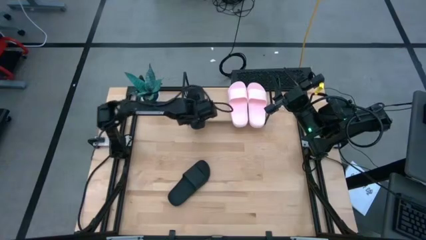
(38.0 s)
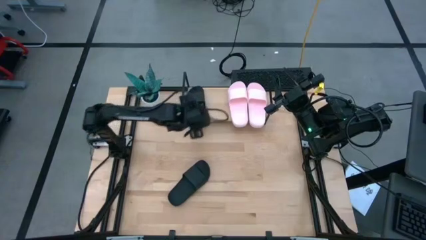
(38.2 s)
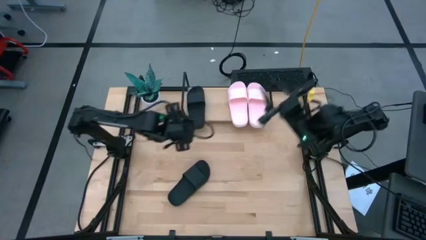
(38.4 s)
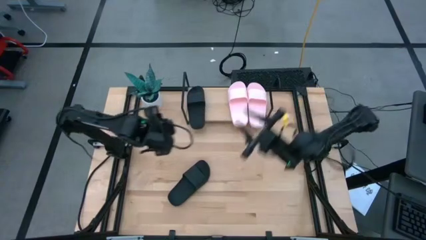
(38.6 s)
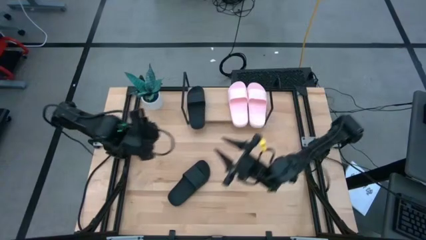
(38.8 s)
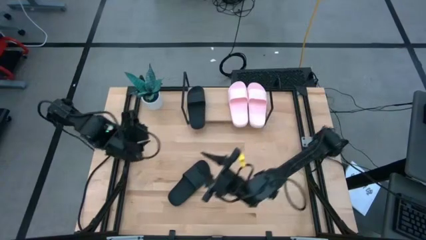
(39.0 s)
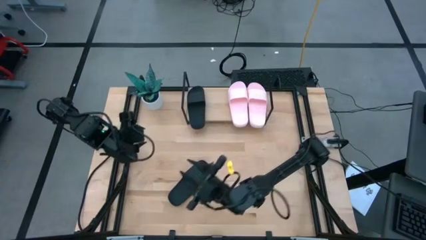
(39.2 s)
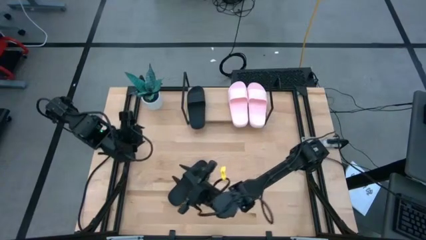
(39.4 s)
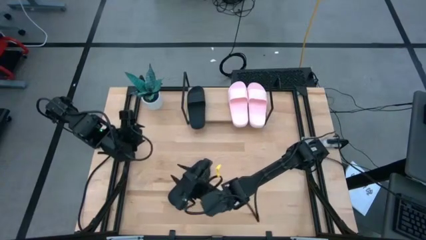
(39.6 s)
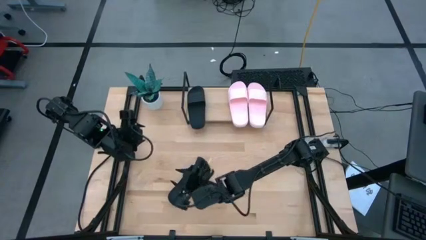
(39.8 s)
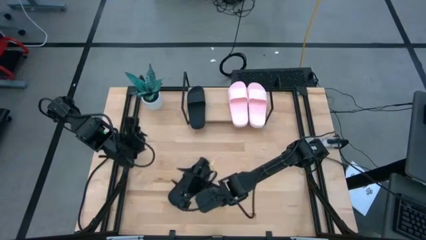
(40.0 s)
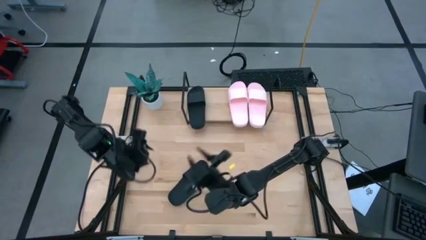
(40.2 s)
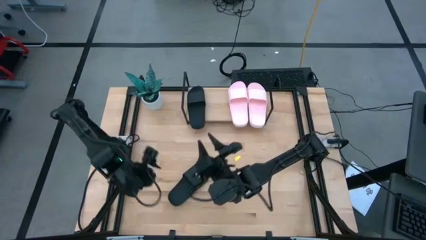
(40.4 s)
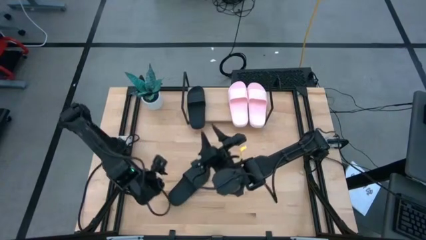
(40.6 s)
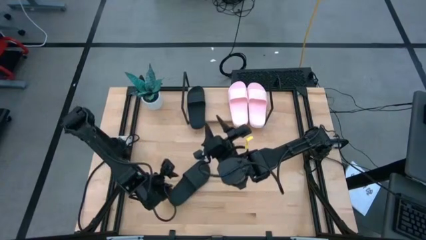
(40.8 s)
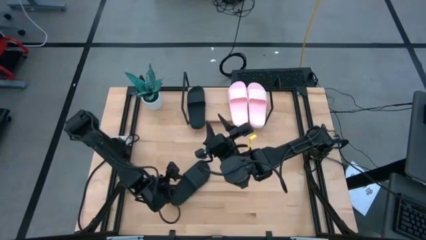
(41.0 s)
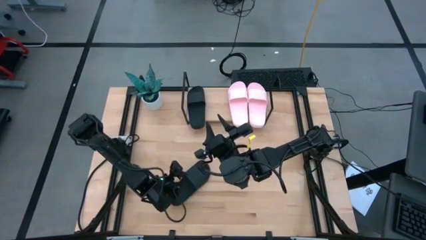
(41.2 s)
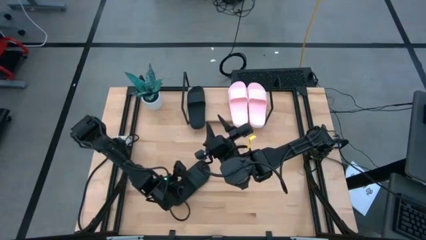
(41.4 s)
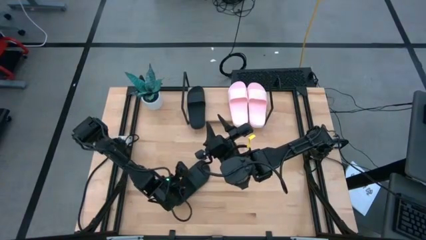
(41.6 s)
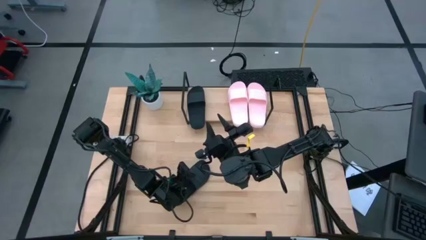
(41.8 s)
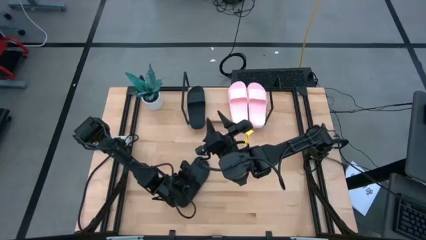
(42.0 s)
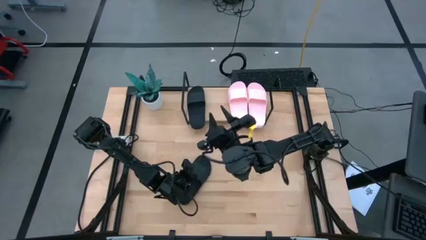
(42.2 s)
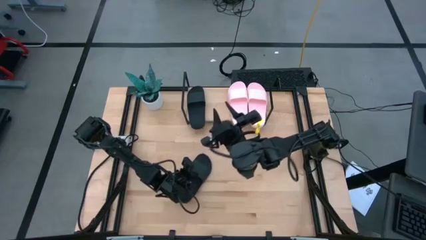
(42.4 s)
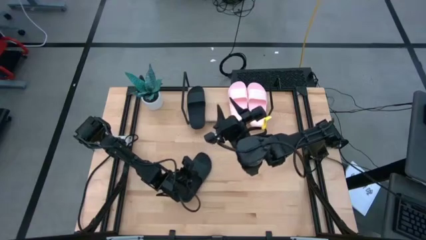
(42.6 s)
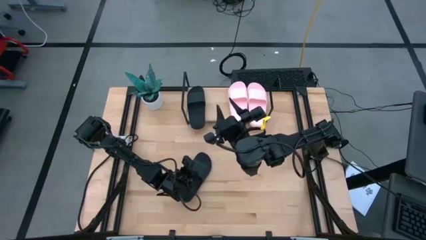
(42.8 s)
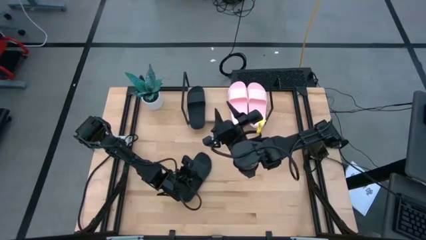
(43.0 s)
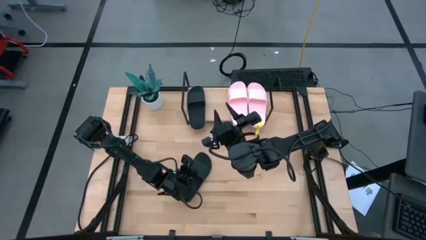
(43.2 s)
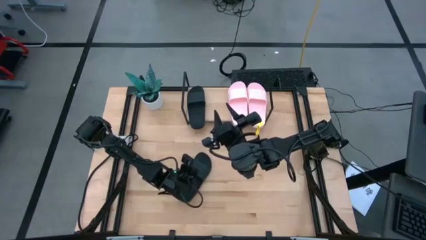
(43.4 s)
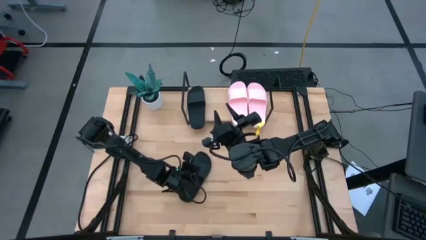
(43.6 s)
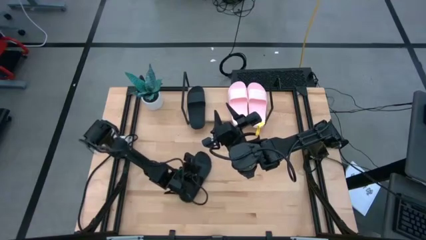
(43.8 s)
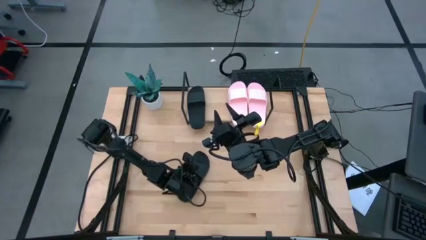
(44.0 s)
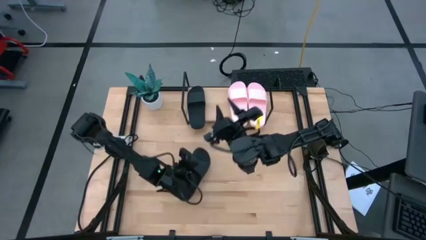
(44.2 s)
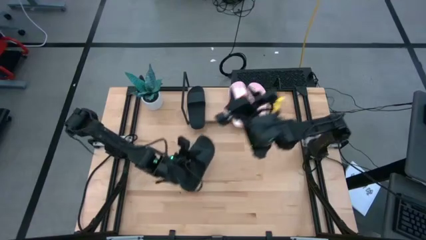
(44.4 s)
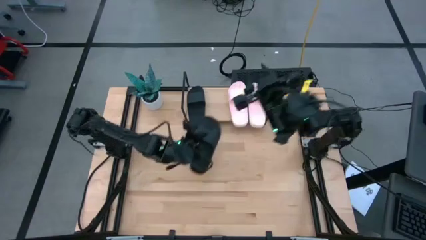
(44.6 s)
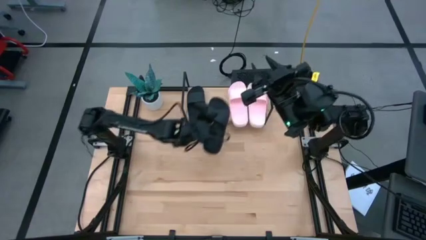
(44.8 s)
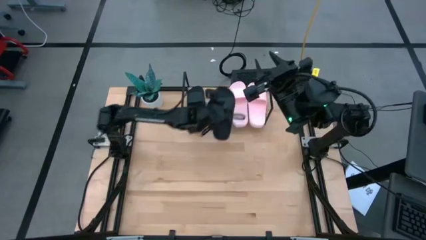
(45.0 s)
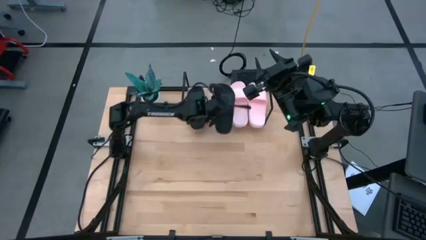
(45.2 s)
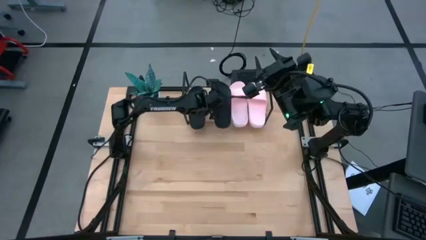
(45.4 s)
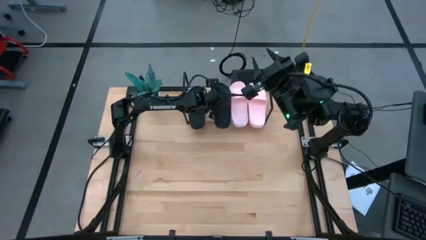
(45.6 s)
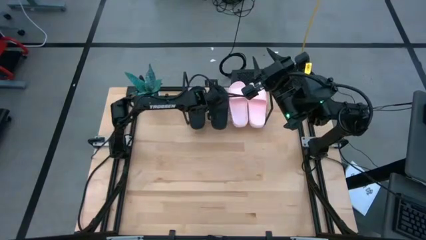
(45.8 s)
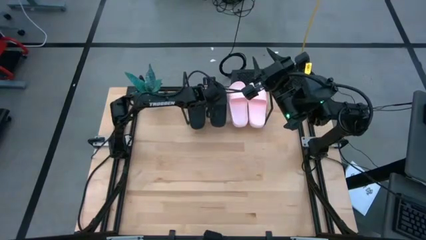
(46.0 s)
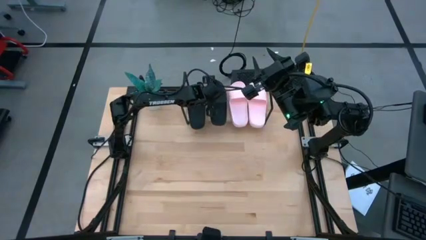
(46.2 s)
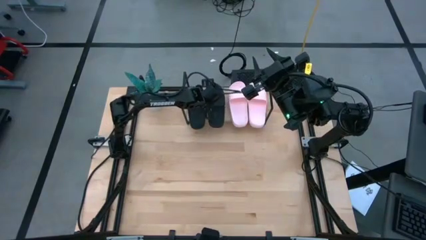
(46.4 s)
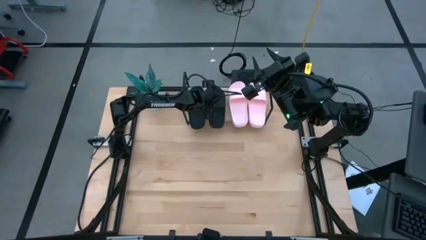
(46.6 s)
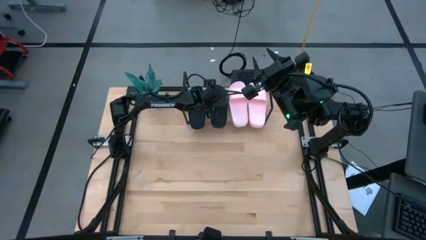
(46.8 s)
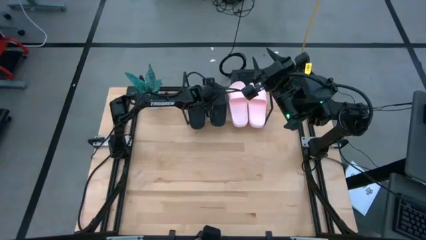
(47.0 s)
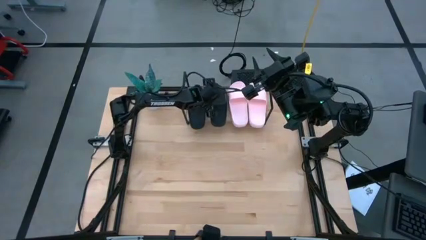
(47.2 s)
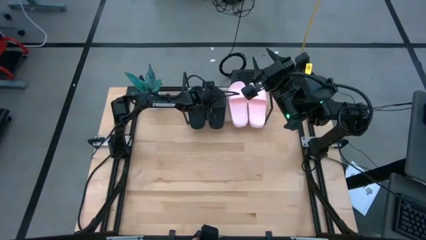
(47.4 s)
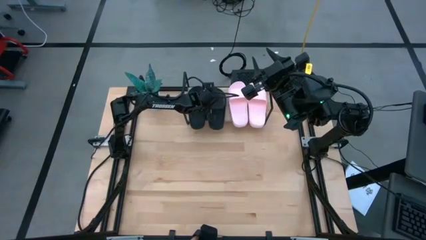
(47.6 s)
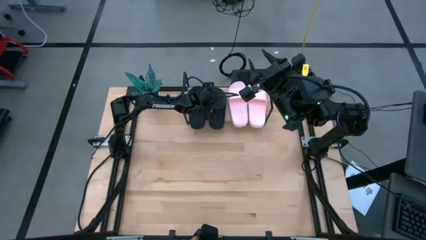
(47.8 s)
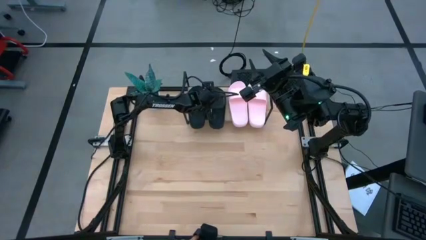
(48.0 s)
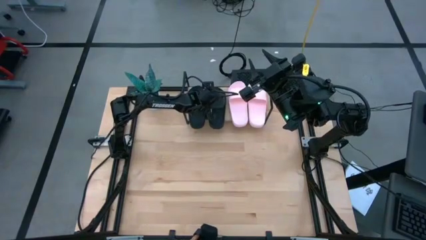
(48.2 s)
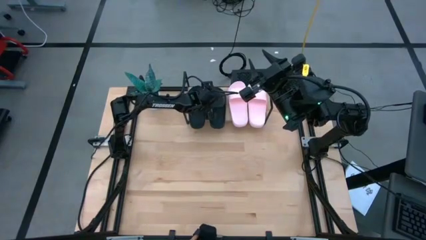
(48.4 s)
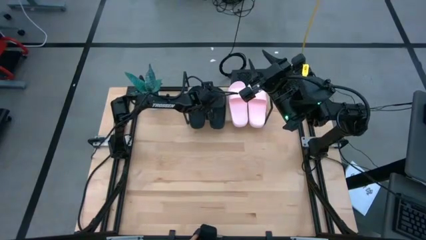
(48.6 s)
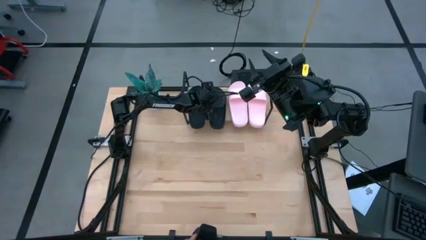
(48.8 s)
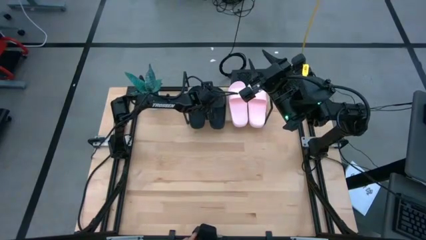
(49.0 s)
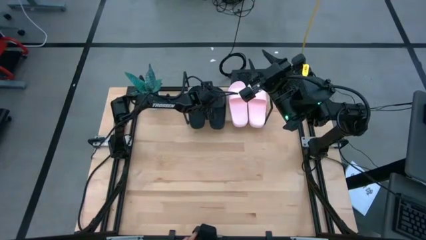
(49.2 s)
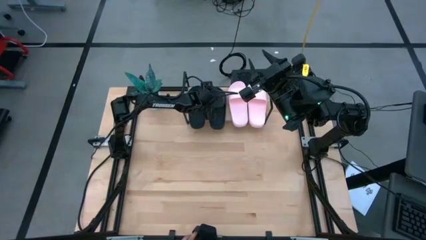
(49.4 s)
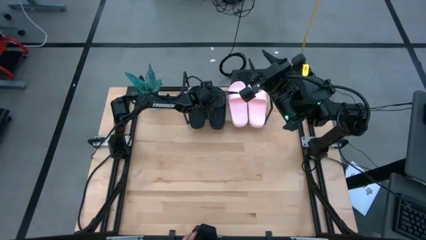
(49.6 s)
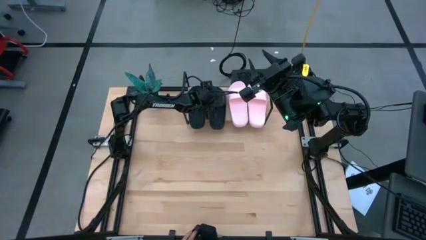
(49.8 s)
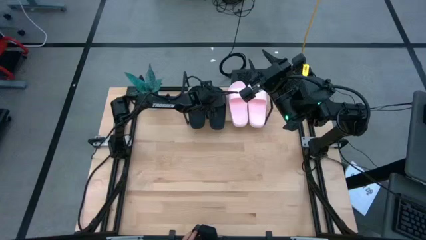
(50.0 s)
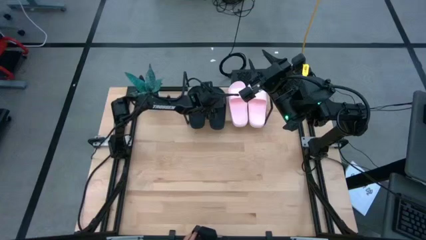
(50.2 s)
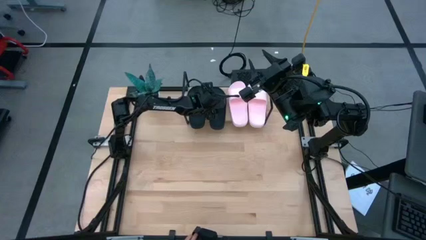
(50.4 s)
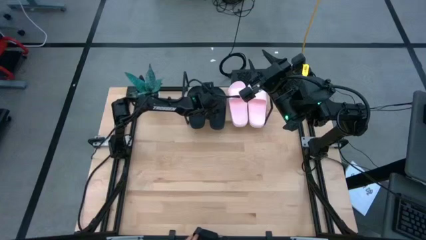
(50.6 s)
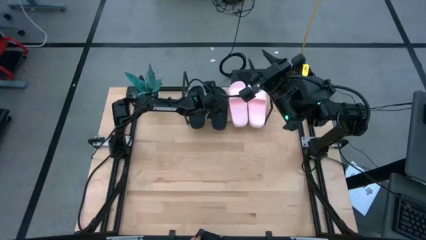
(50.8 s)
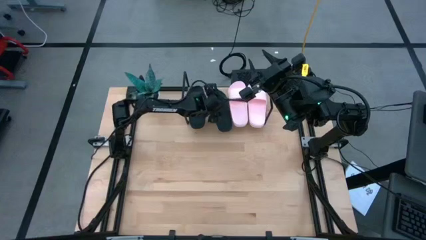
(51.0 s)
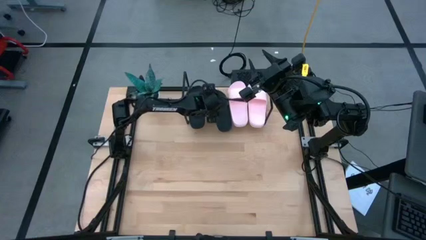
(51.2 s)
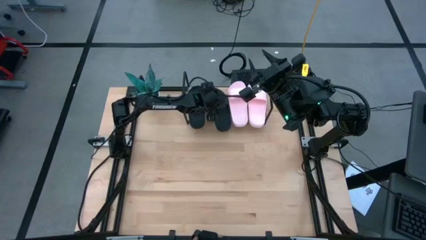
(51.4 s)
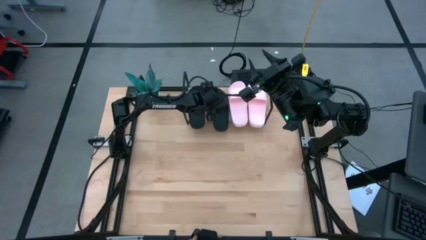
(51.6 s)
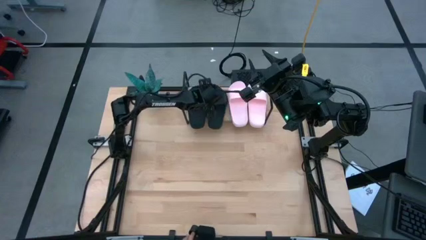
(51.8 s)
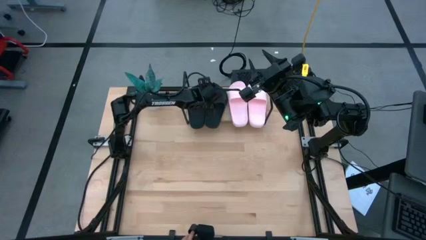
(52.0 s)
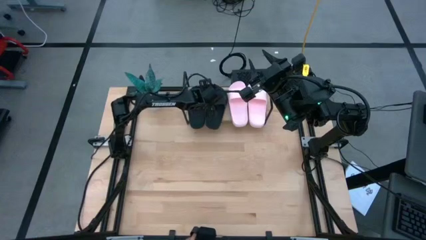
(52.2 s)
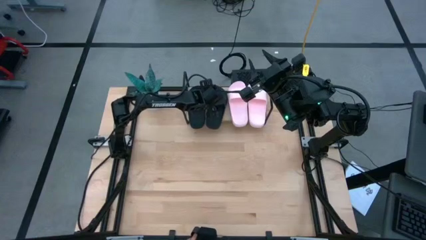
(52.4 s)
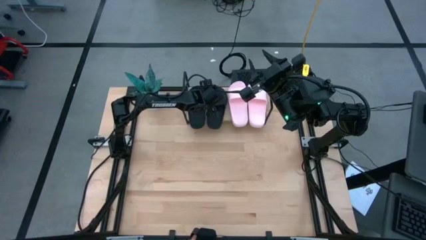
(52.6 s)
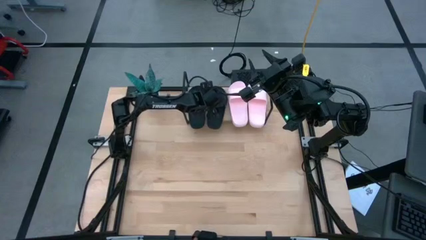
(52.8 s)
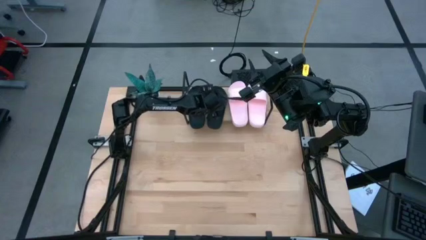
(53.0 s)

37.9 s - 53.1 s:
Task: Pick and place slides into the shelf
Put the black slipper on the shelf

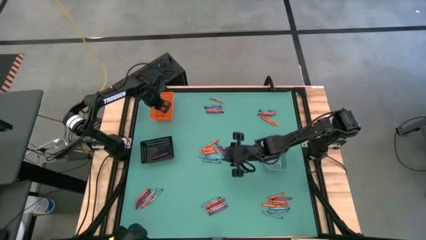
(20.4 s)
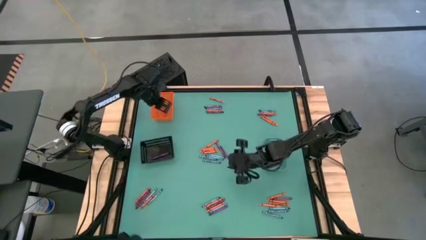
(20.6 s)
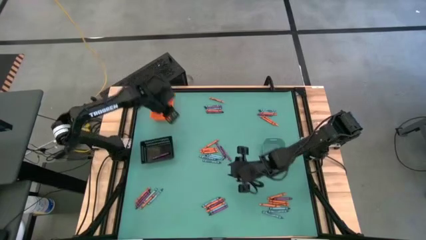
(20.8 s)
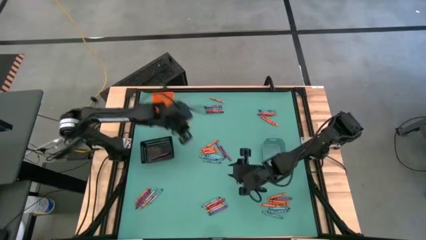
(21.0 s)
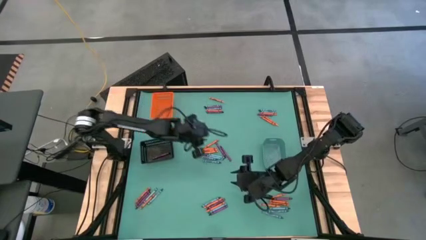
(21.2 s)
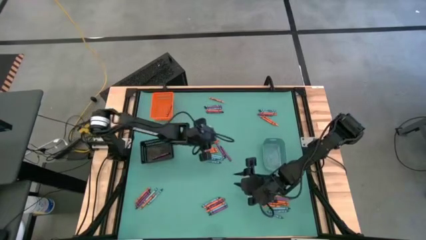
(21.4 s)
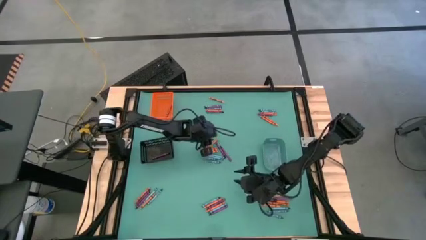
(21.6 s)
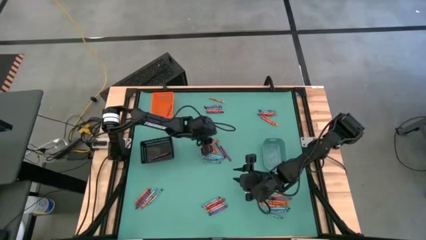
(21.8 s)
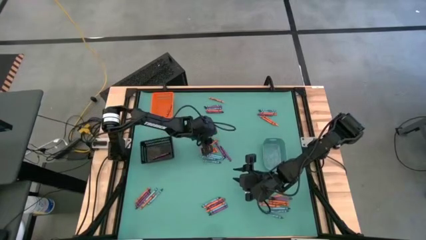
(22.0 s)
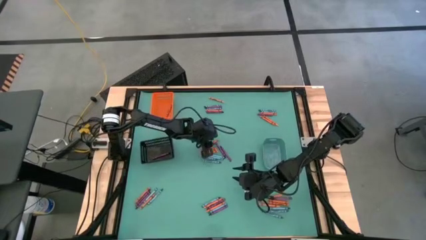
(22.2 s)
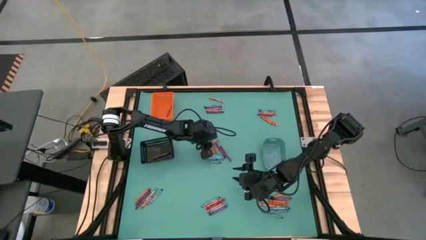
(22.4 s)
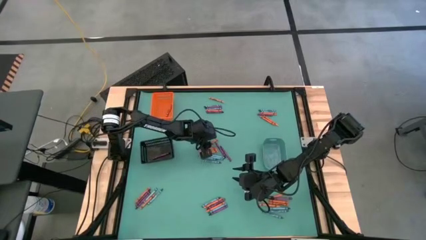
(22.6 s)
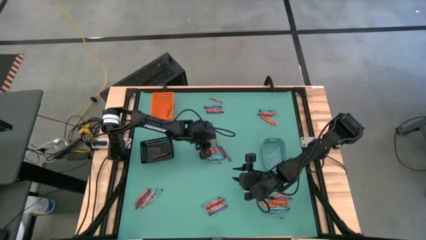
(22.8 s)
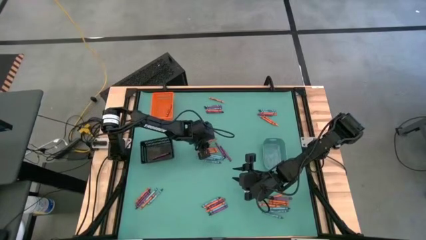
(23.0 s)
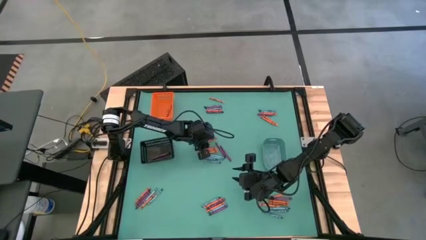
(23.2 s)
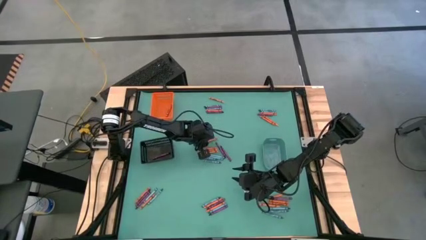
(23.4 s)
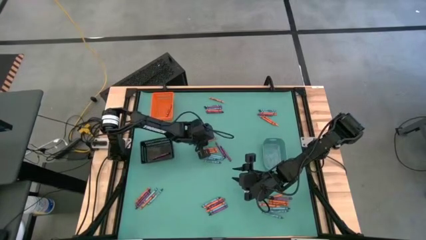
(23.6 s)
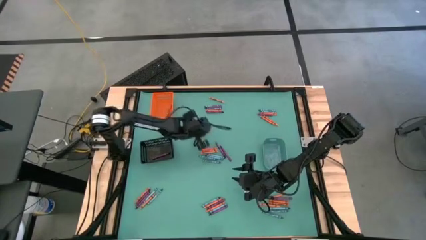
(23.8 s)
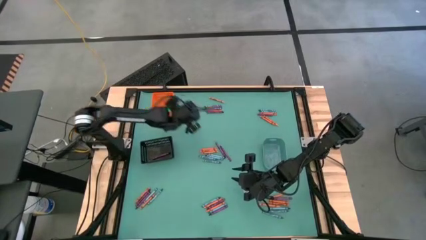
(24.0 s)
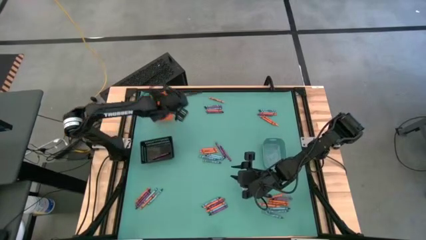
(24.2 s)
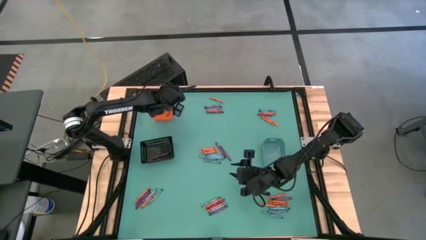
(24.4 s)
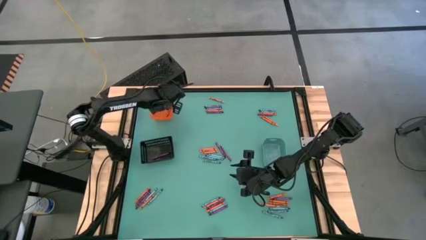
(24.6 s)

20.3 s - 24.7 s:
Task: Sort crayons
Put the orange crayon into the orange bin
